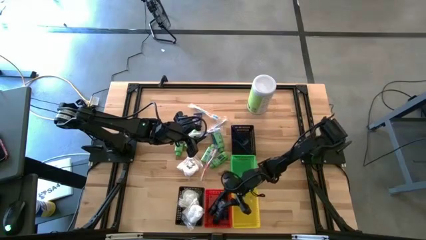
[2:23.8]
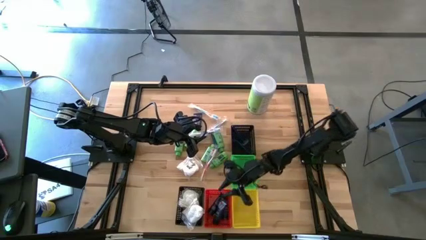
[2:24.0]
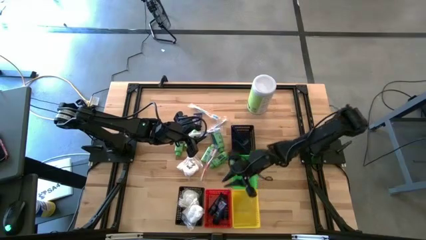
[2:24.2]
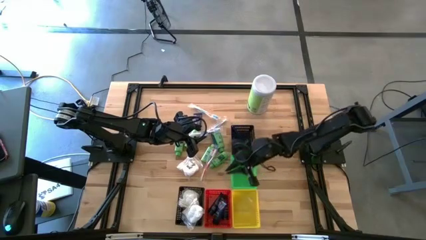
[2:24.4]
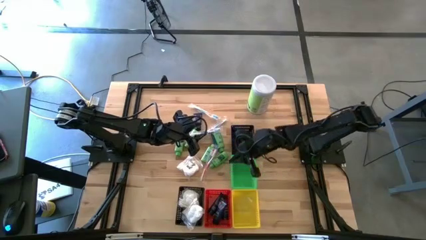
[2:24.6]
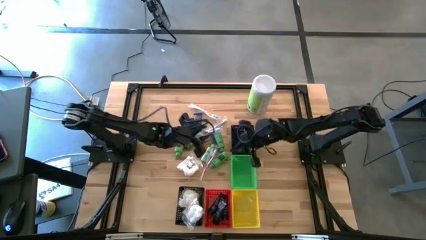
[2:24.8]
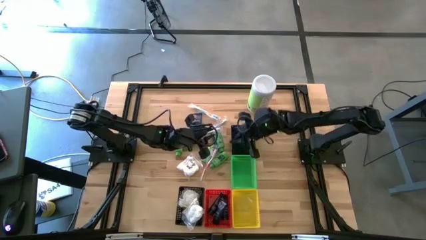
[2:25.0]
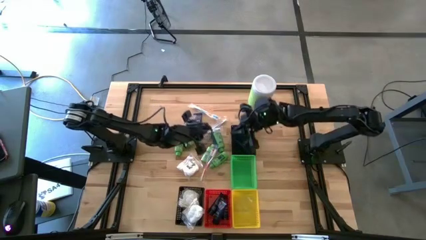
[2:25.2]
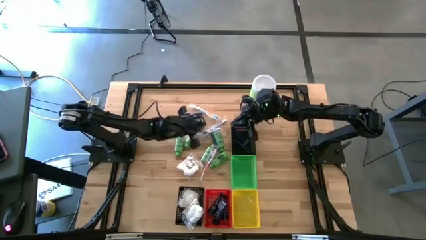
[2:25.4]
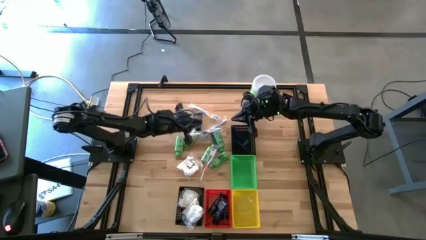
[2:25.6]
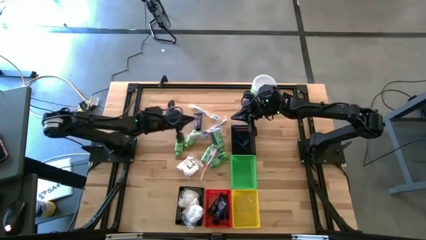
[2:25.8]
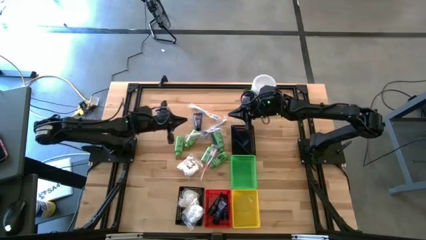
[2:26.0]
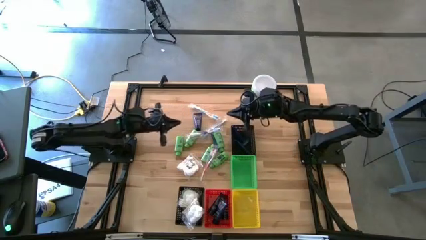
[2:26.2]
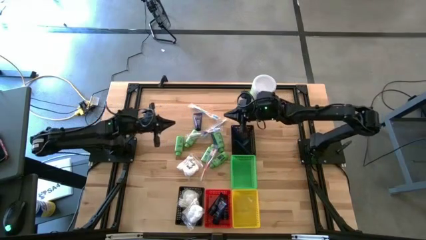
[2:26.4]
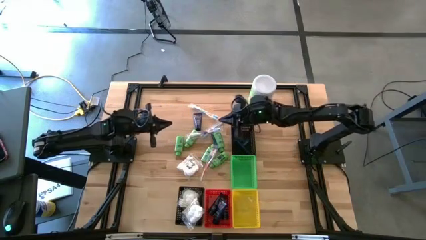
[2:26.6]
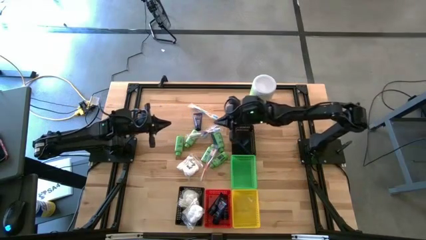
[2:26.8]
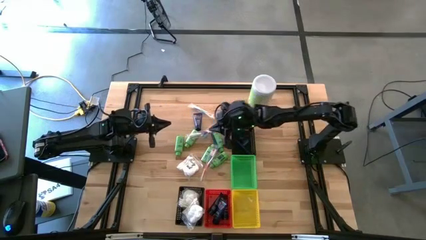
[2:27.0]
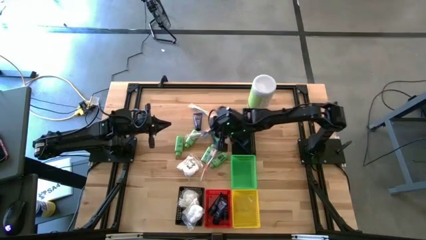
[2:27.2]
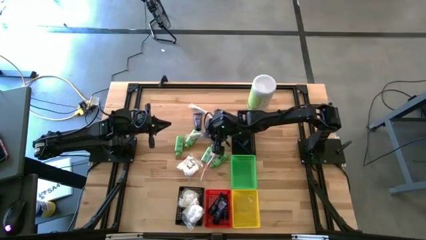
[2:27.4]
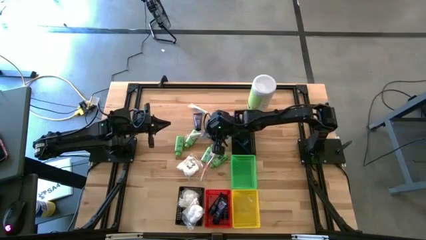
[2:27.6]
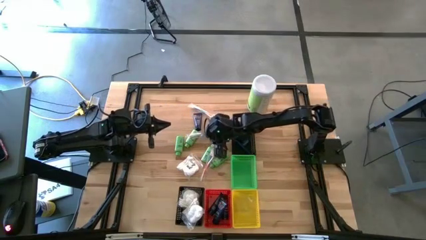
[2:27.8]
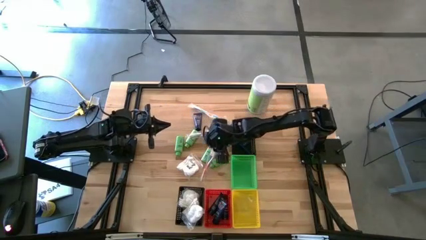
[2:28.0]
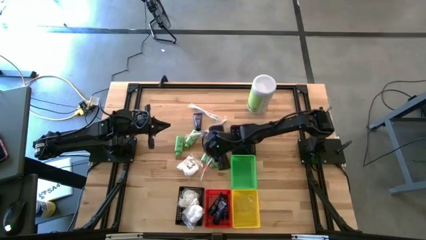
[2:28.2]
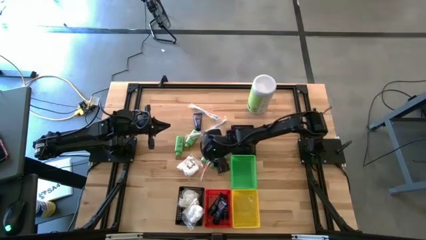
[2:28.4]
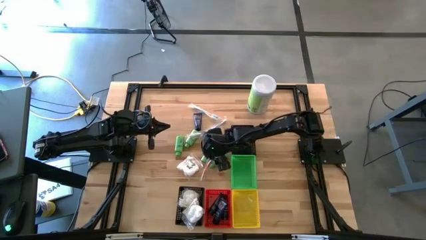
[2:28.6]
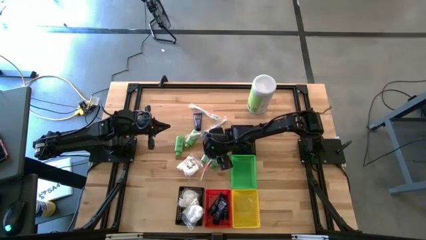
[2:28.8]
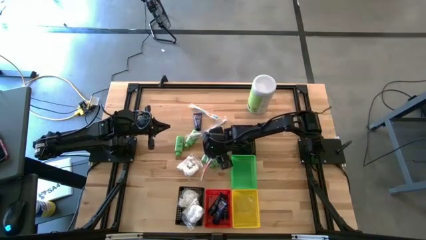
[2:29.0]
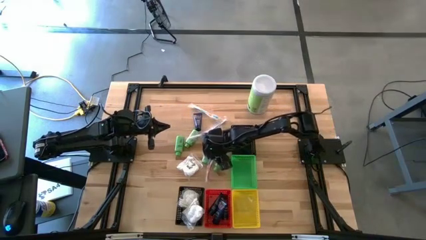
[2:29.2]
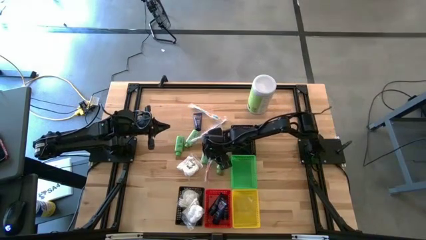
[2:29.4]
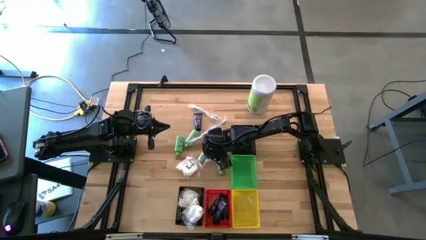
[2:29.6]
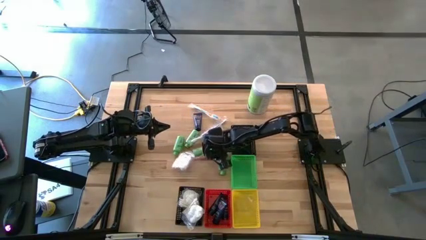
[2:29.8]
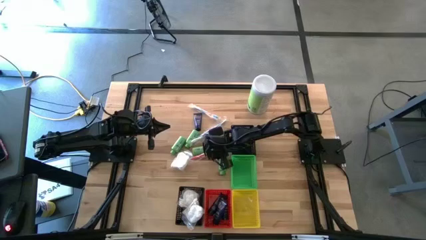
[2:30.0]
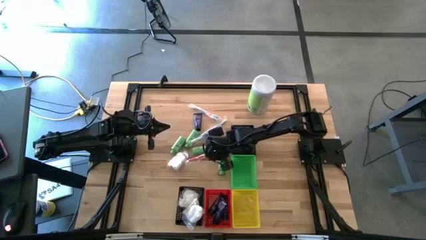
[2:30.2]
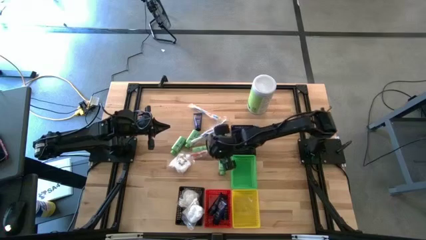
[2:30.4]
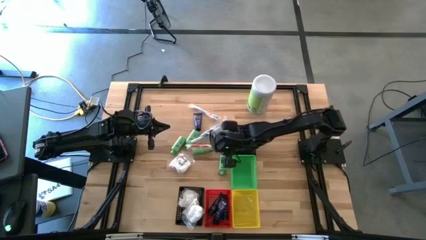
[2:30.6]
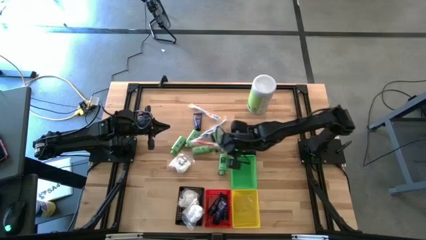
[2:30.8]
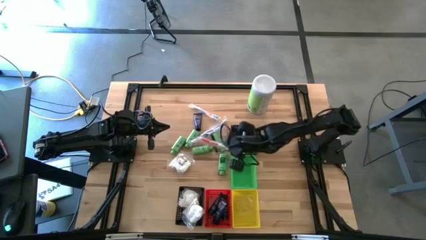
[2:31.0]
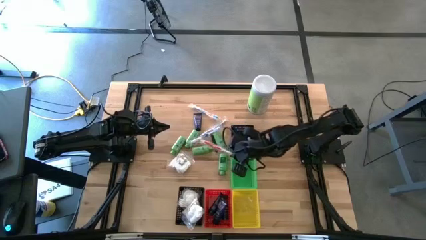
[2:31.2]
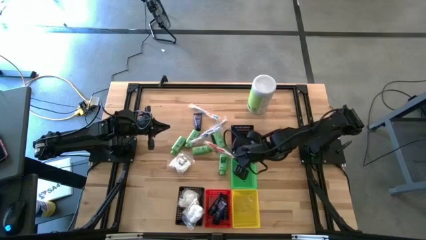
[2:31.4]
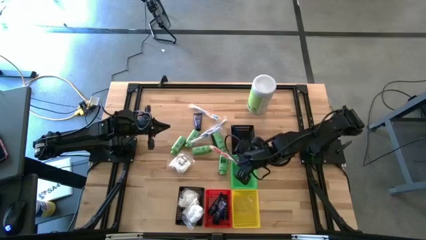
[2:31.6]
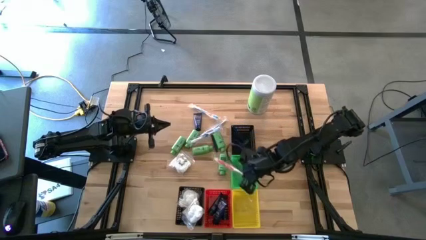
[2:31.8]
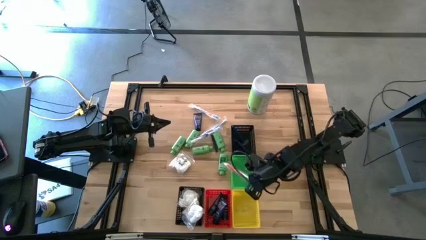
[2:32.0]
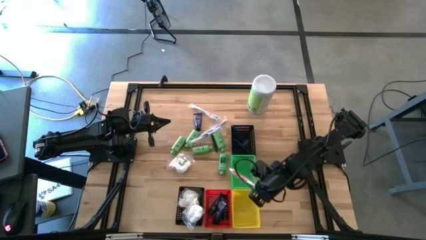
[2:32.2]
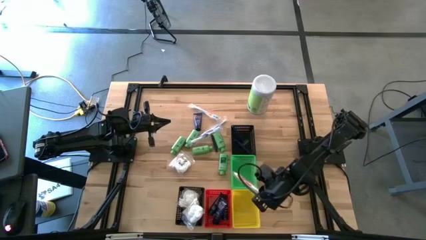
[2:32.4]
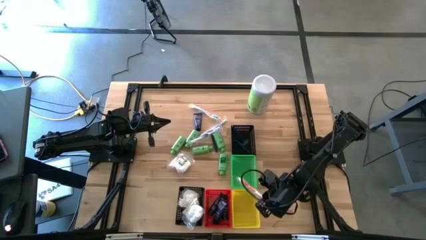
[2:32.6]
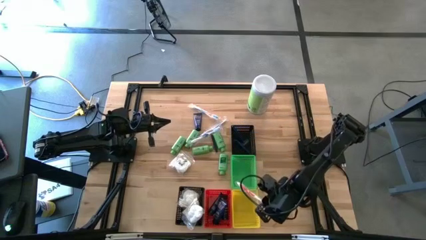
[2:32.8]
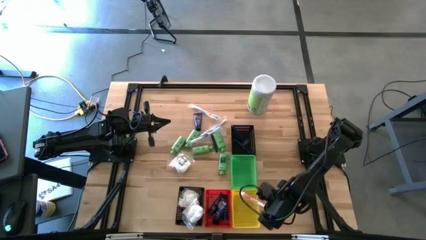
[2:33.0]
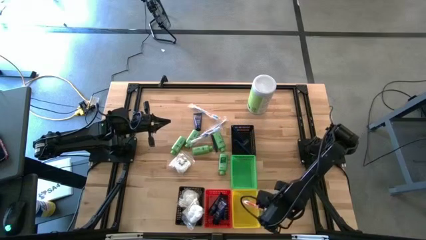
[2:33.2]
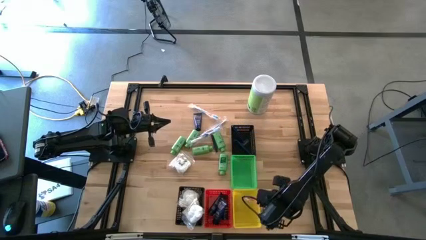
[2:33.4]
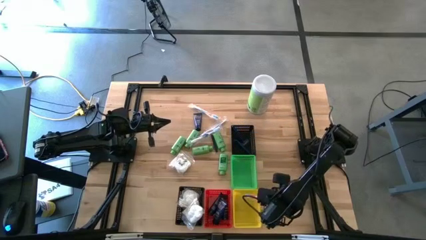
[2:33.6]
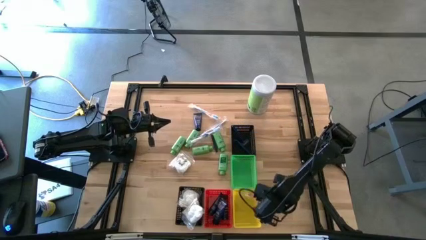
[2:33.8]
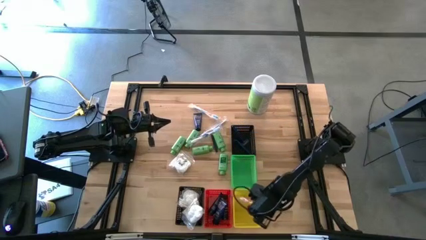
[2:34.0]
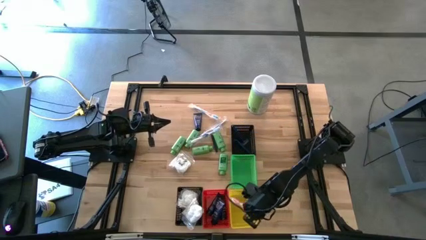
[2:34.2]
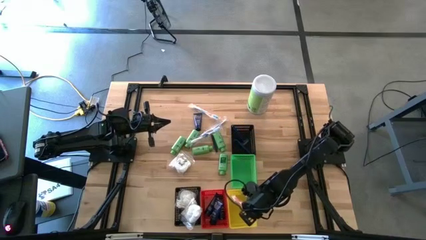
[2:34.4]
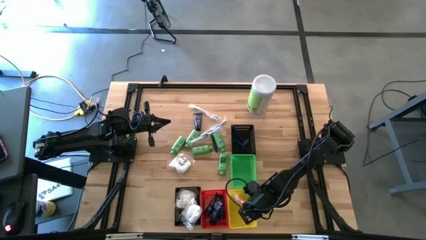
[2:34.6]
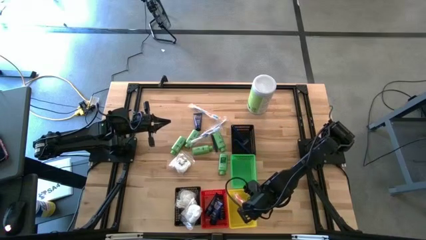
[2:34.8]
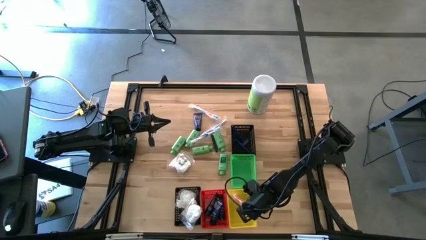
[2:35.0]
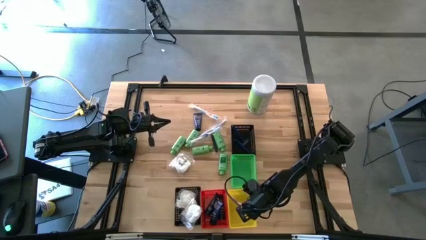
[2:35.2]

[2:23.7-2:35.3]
Task: Pick & Place Travel size toiletries
Put the orange toothbrush into the yellow bin

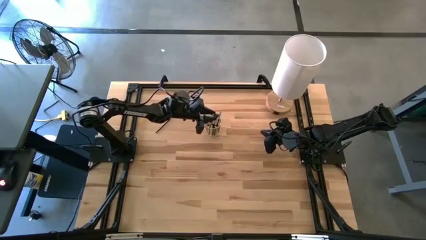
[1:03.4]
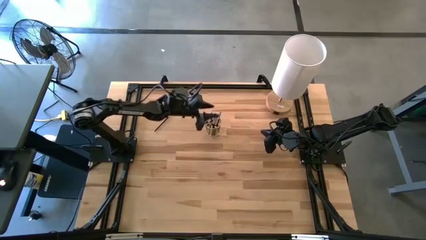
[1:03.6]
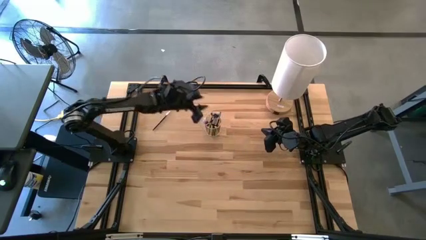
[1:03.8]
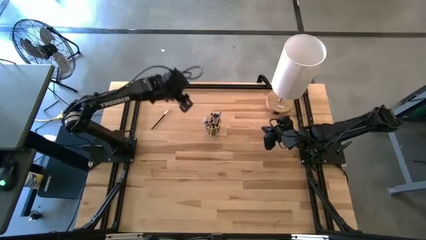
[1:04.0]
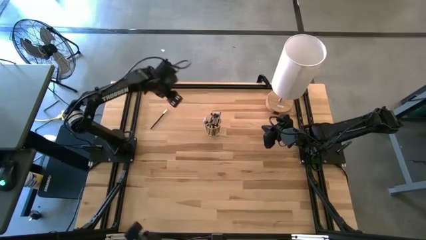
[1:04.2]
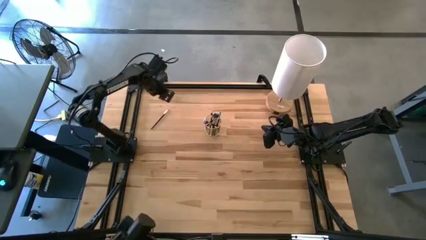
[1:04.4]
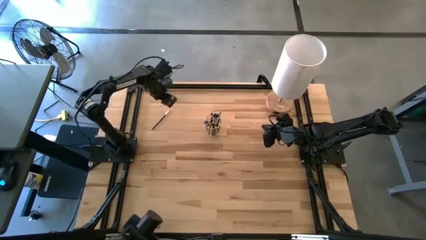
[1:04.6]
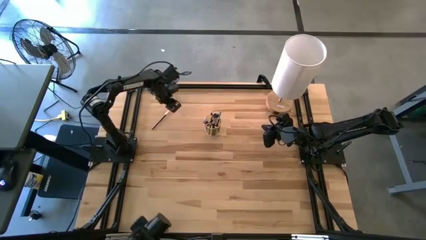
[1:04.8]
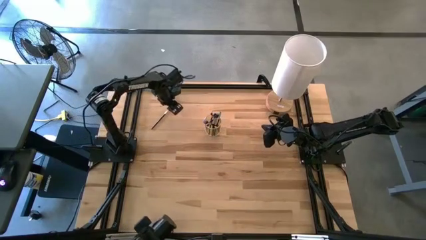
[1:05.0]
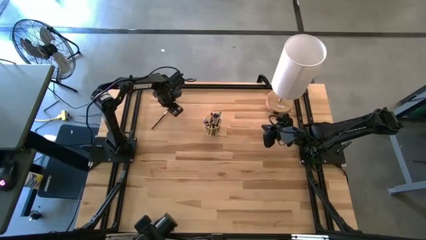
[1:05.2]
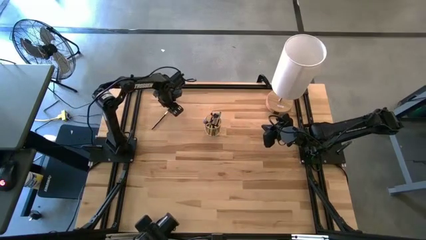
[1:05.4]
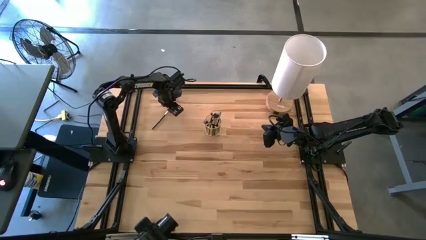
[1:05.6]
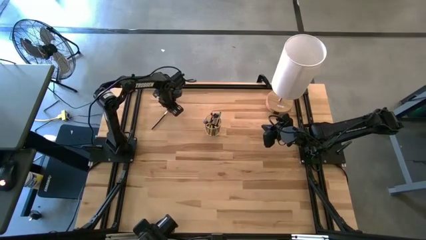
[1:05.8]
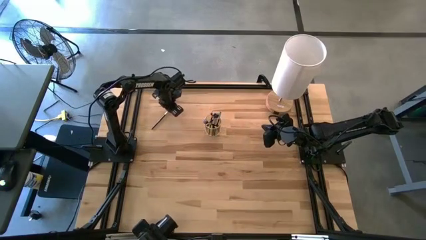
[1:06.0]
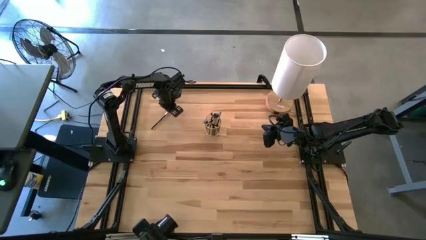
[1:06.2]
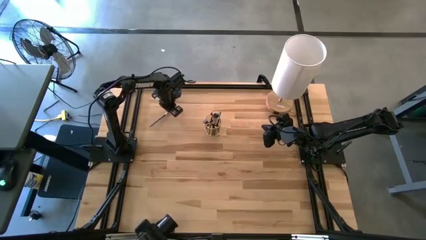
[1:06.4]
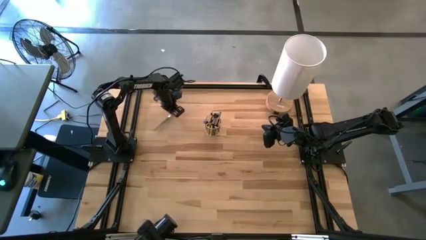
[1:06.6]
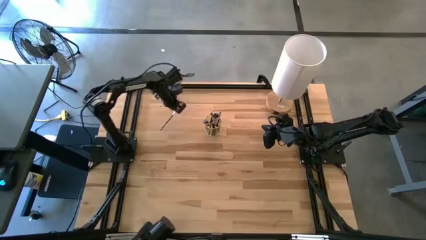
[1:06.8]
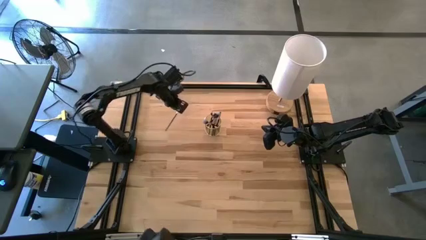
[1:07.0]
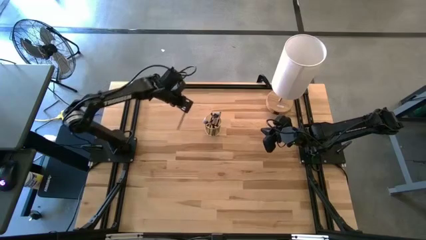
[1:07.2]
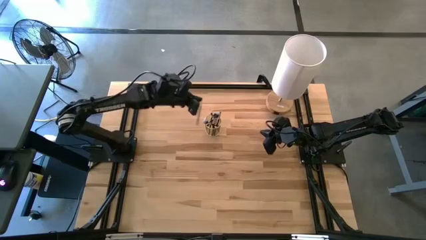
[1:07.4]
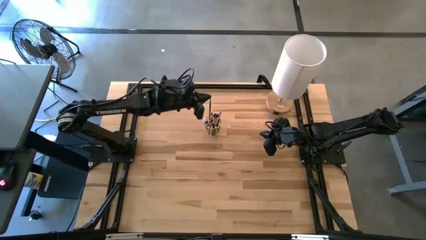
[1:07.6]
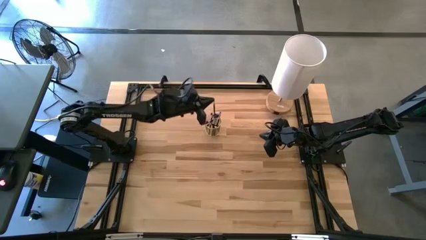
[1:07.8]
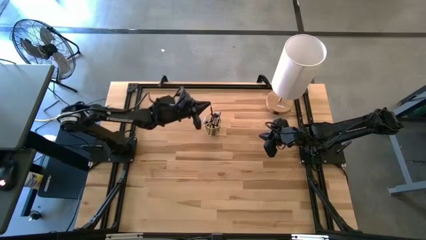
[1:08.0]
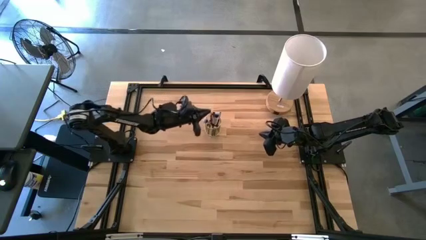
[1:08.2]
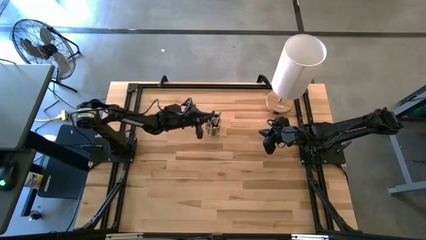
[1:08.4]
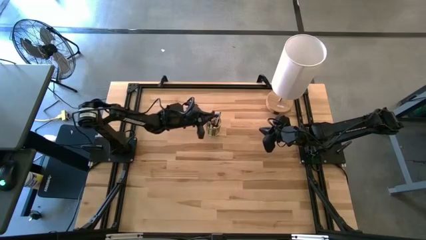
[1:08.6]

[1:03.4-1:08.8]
Task: Put items in baskets/containers
Put the black eyeshadow brush into the gold container

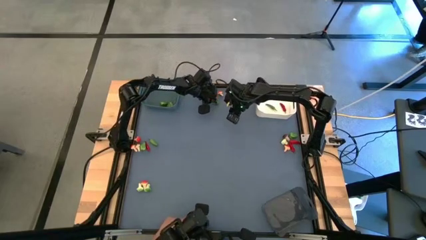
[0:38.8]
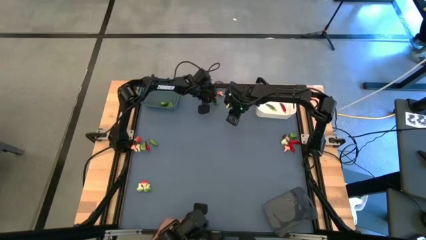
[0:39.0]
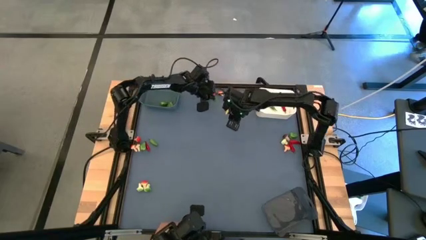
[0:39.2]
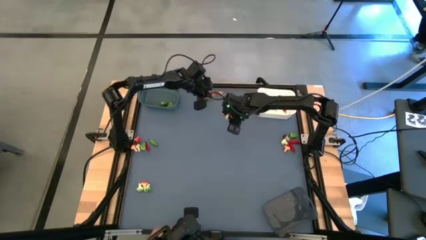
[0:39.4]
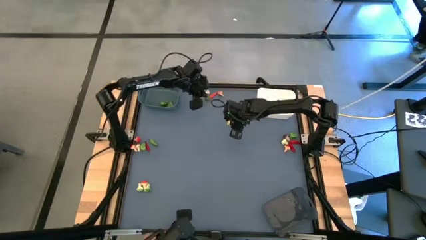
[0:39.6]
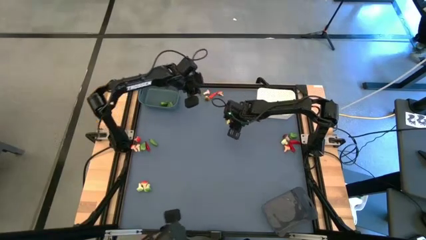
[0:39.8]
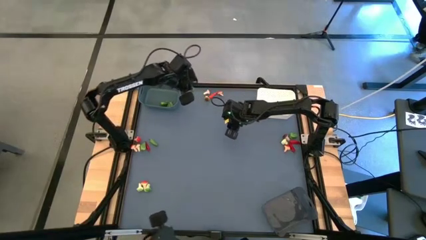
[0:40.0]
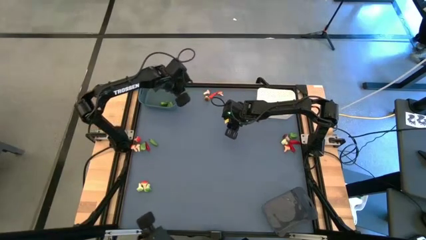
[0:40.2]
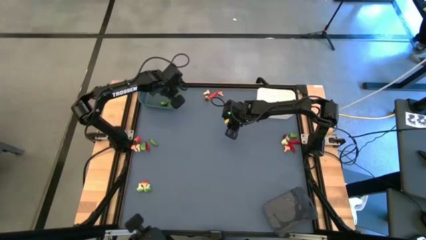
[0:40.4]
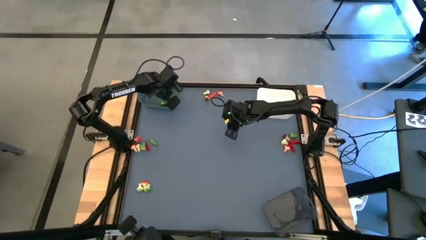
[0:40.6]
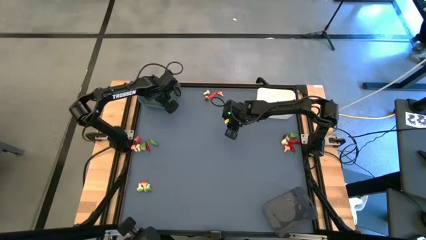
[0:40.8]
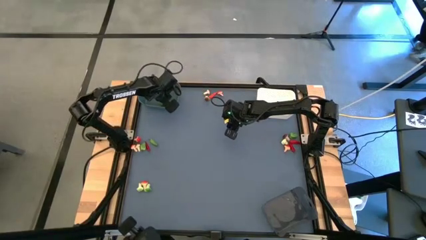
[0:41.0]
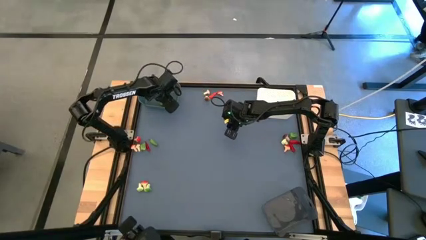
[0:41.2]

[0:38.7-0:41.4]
Task: Sort produce into baskets
Put the green bell pepper into the blue bin
